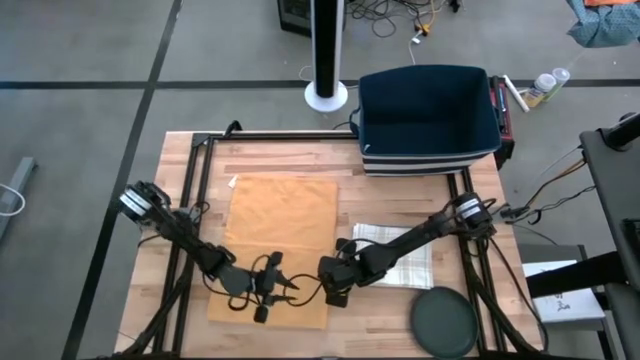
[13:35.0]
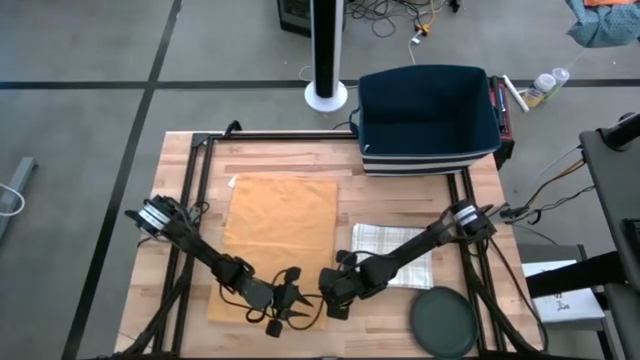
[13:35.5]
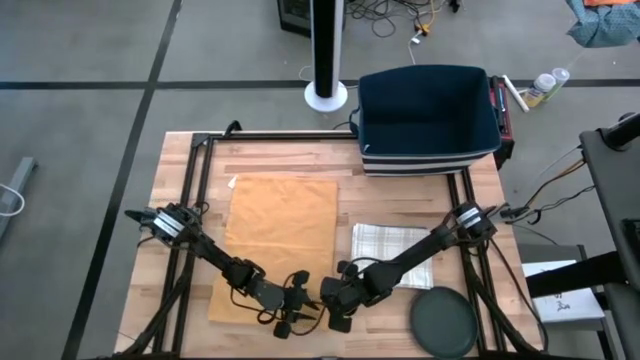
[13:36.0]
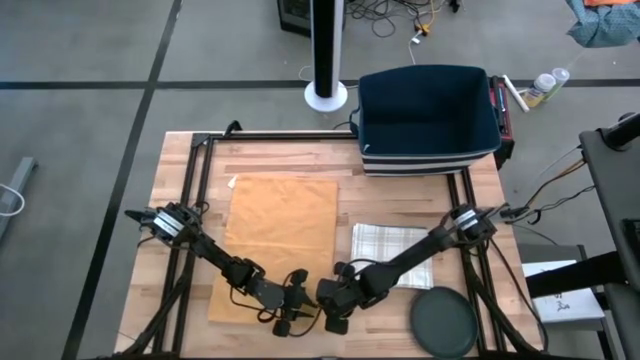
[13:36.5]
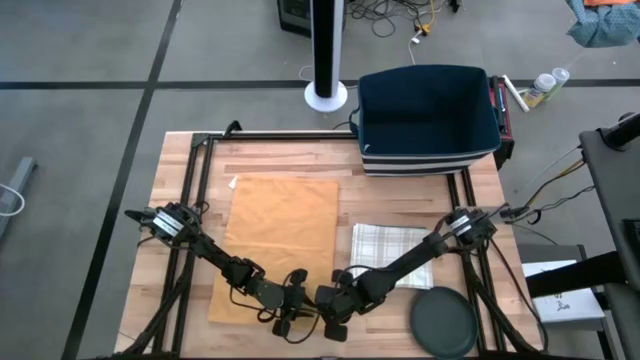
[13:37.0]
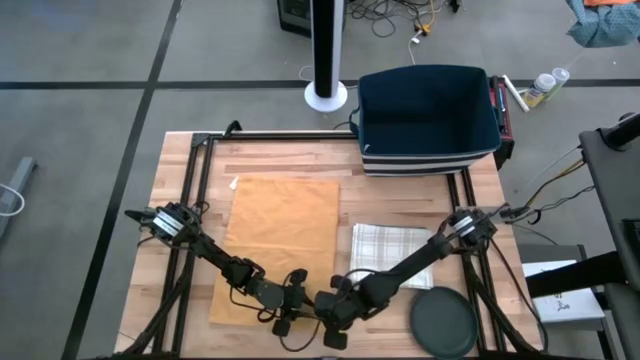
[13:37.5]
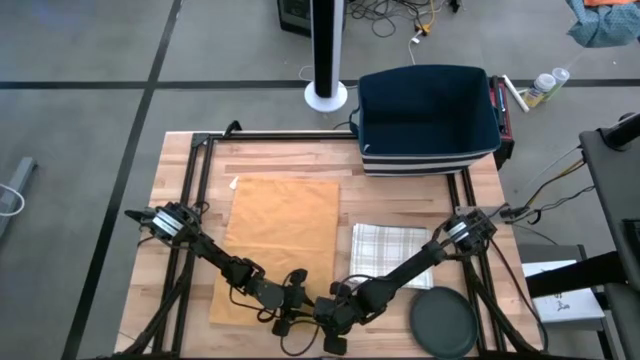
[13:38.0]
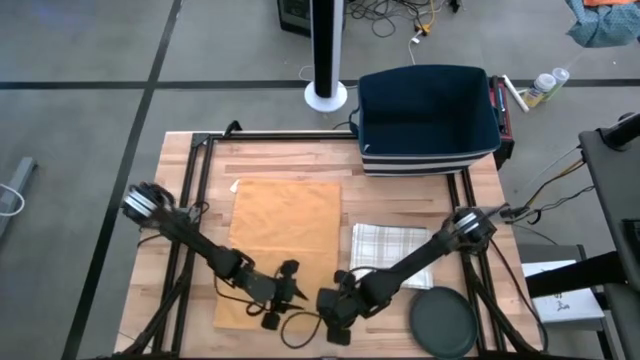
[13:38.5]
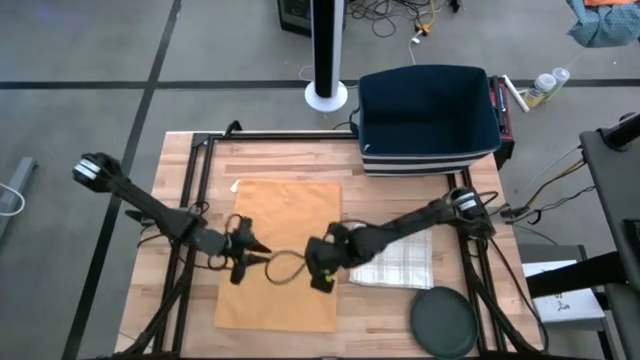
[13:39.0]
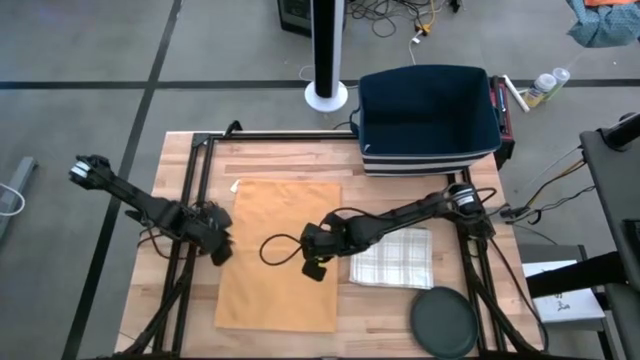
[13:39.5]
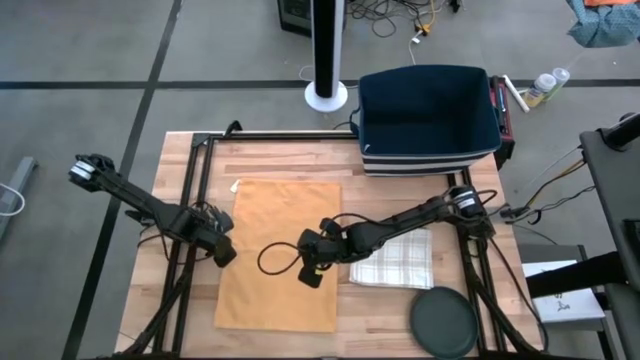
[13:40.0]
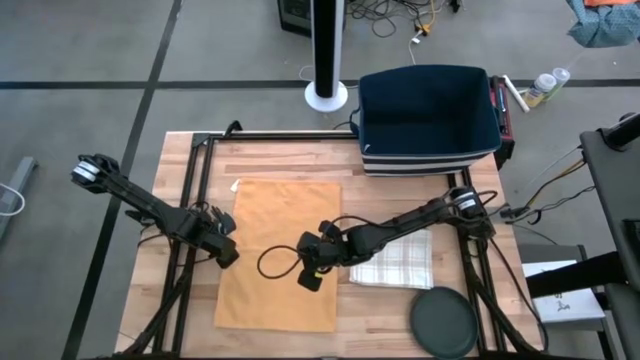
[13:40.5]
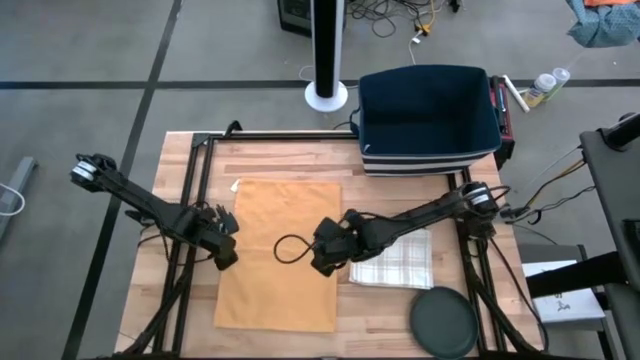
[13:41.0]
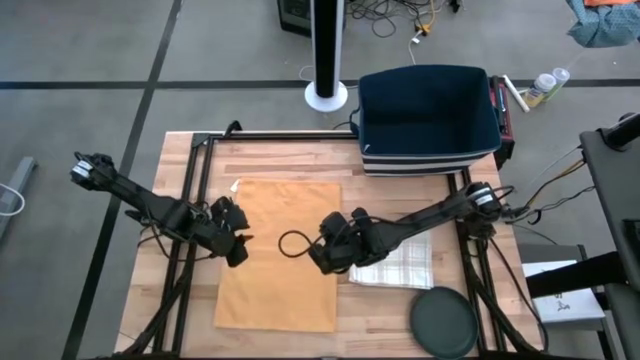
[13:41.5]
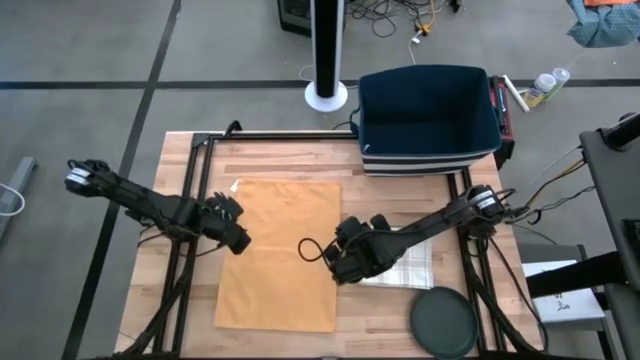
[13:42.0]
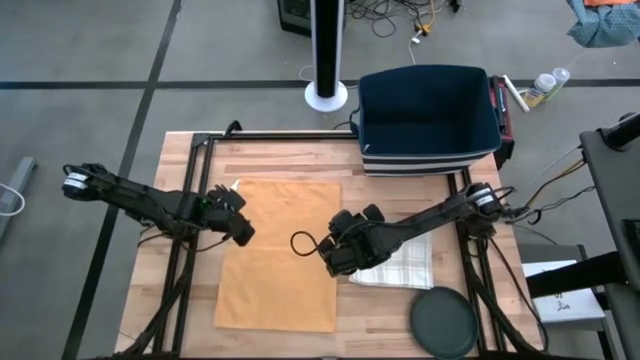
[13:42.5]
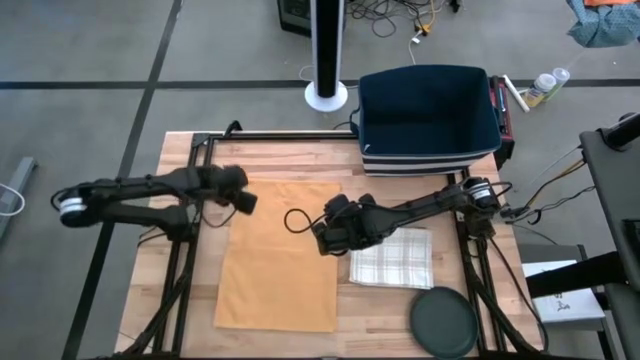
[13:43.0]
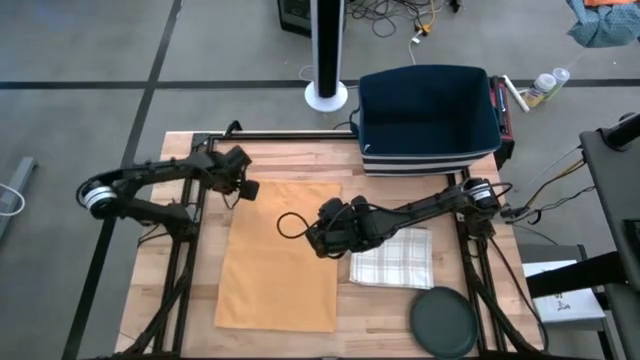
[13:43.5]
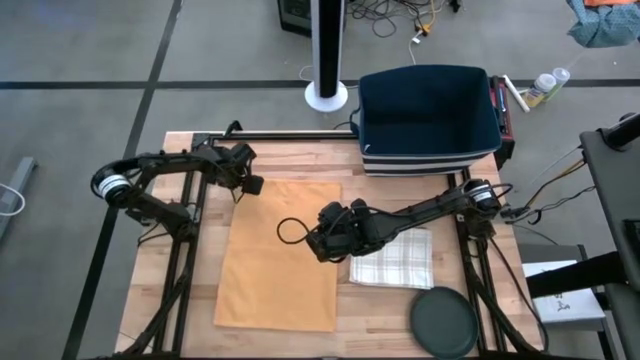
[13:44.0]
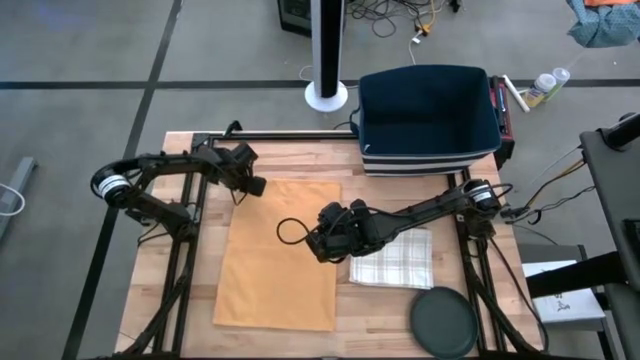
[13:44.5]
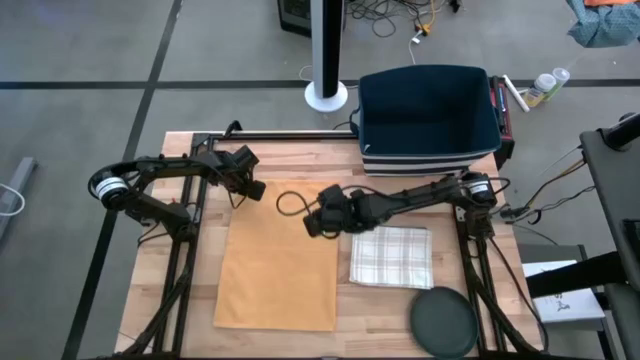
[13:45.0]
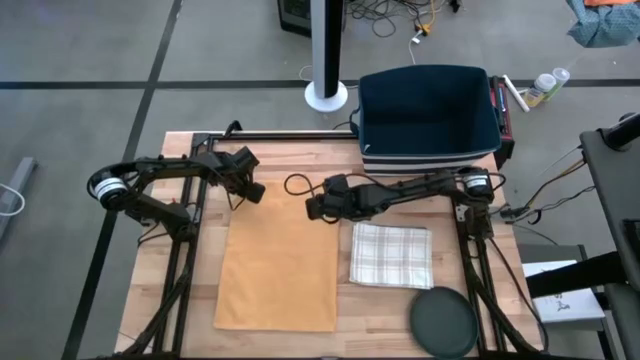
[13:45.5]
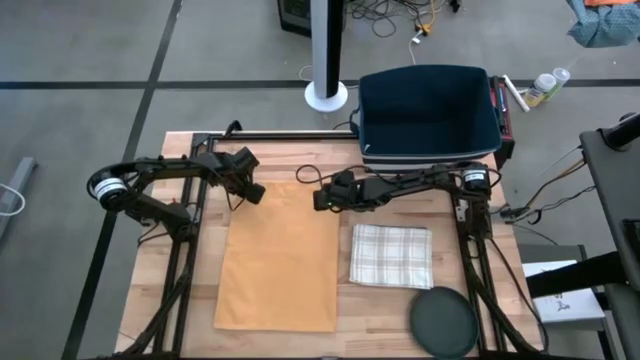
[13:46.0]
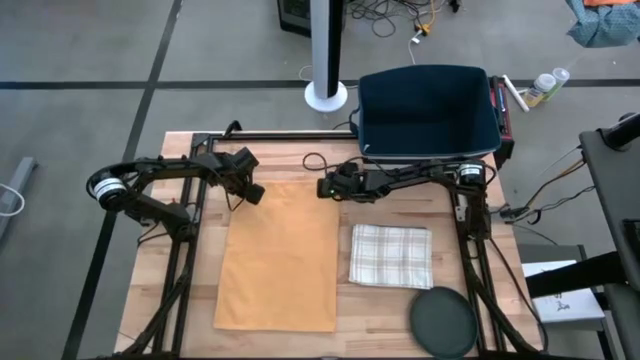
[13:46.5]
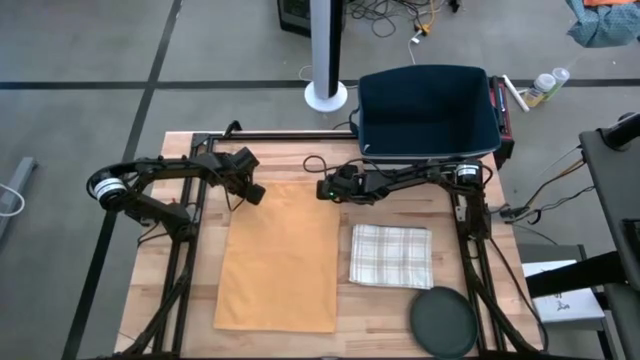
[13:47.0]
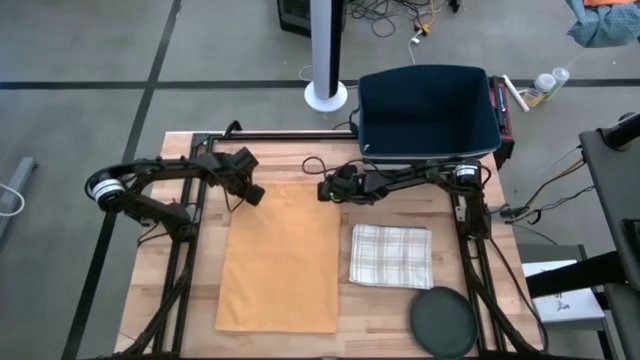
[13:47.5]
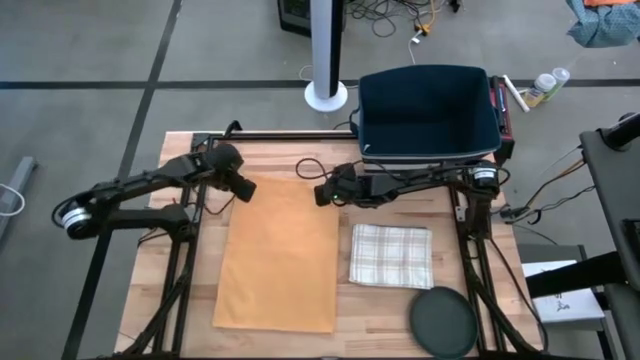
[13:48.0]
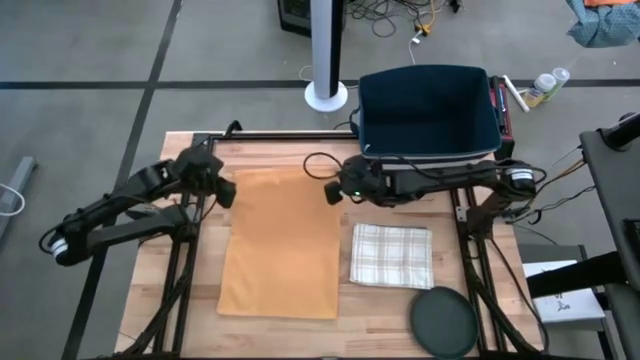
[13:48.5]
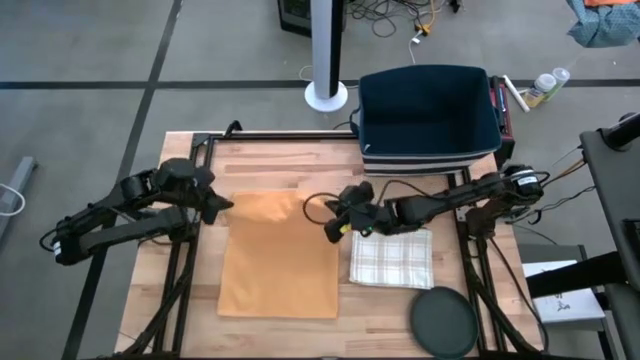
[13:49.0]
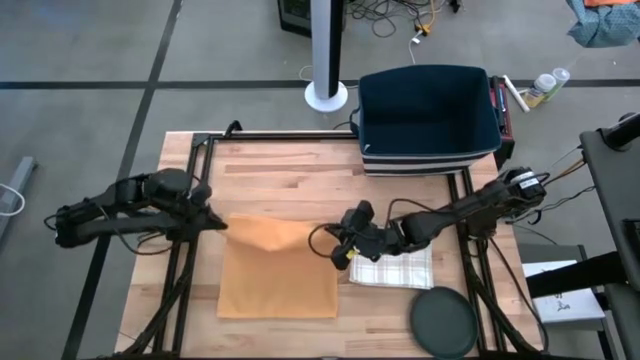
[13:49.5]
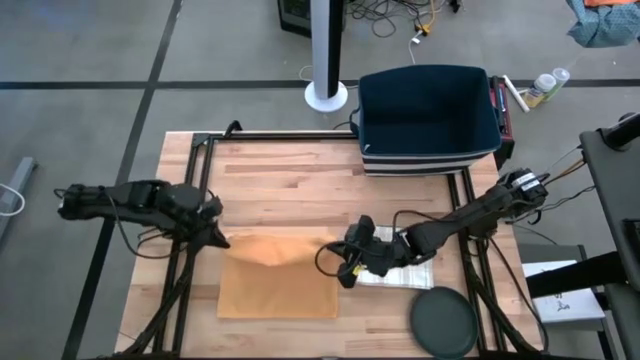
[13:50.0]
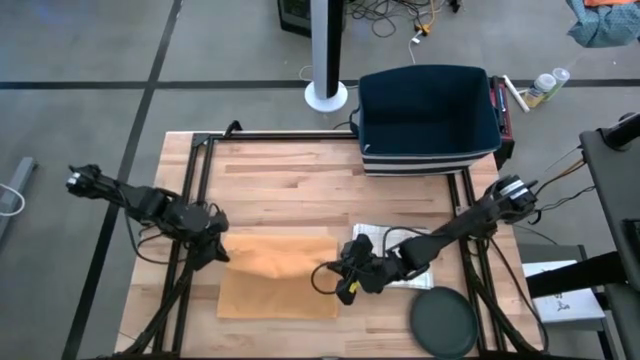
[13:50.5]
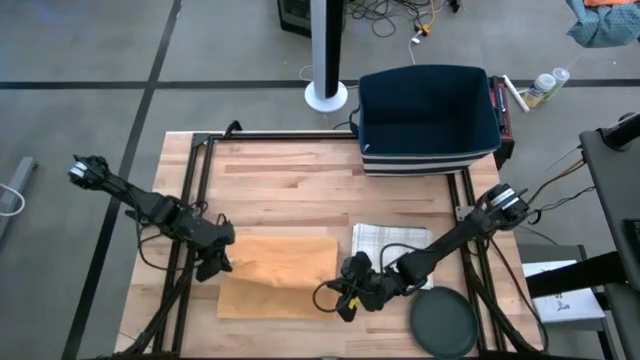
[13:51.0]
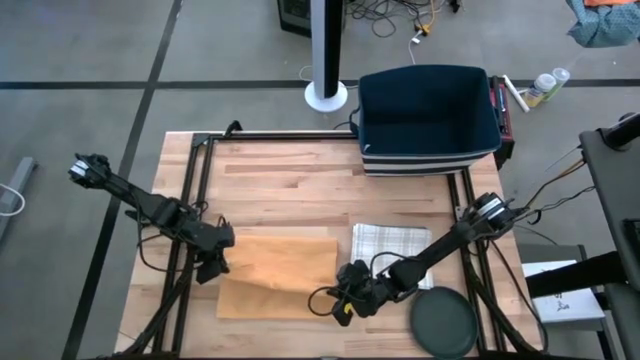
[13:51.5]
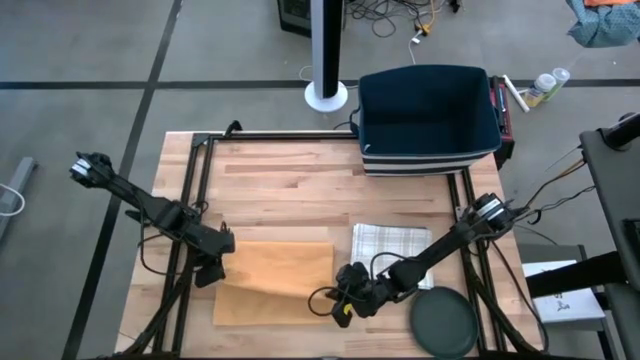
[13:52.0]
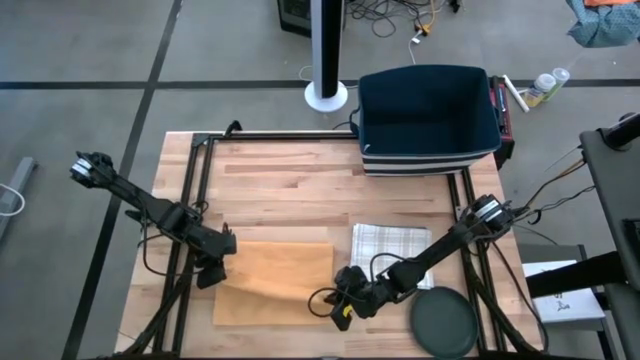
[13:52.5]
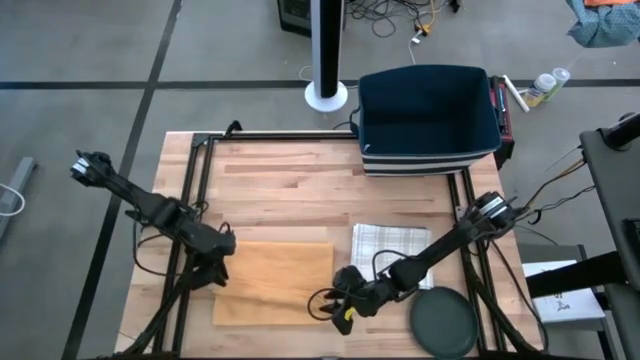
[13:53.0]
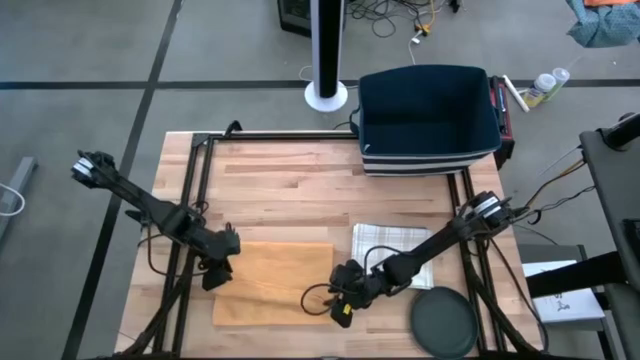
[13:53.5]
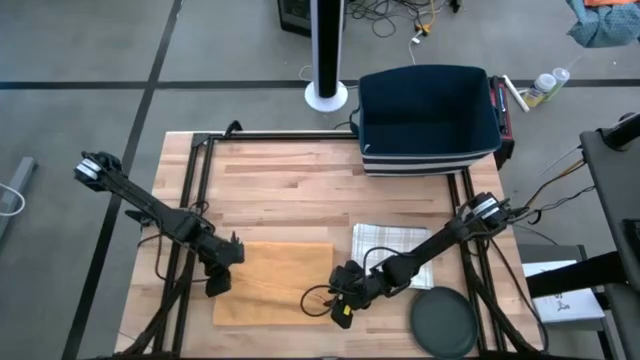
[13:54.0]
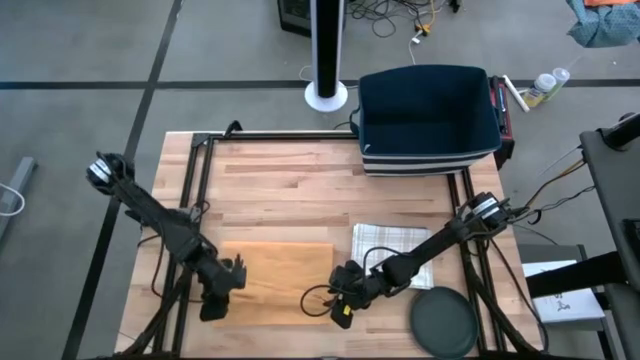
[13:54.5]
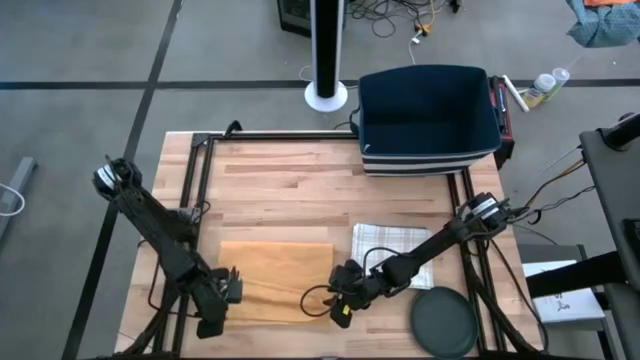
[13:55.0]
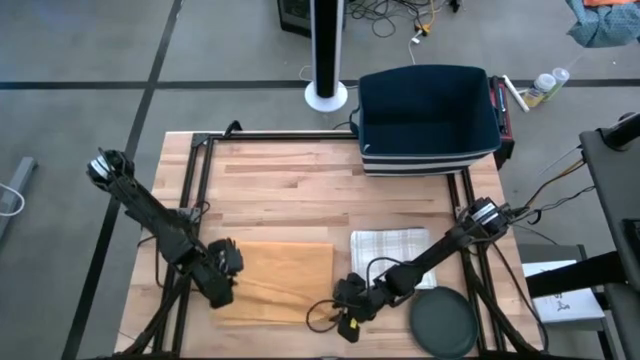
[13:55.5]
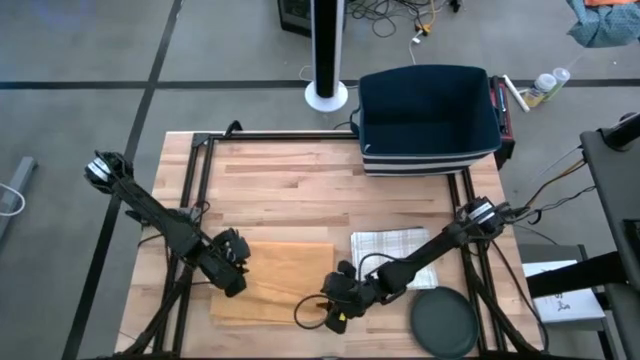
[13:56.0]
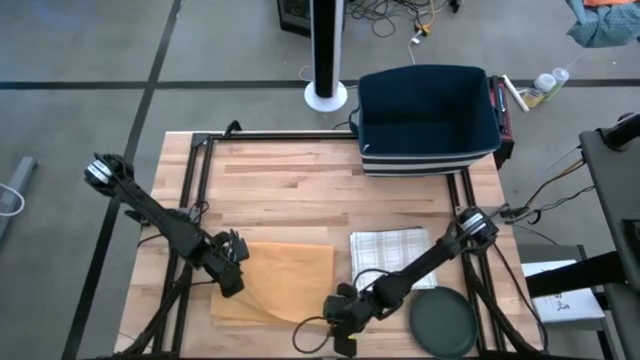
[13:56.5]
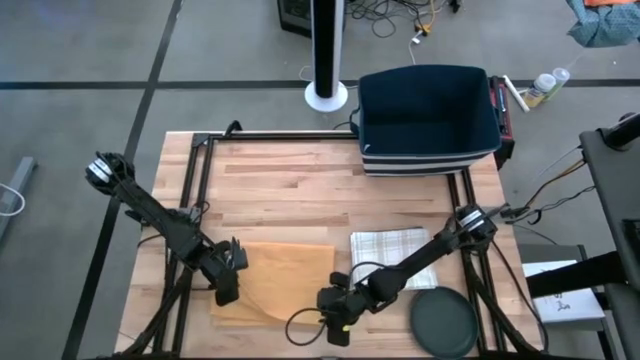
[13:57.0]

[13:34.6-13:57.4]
Task: Fold kitchen towel into neat rectangle
Fold the orange towel
